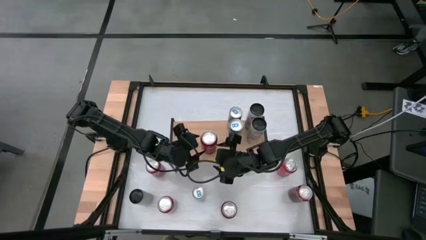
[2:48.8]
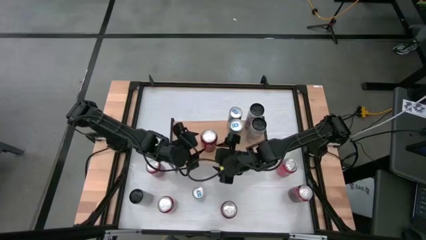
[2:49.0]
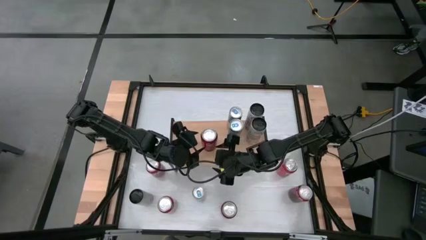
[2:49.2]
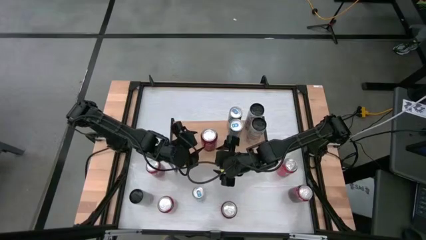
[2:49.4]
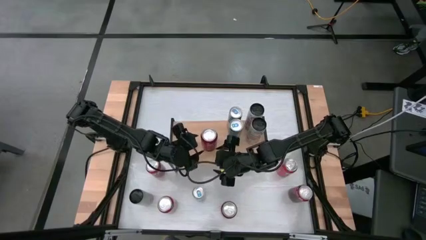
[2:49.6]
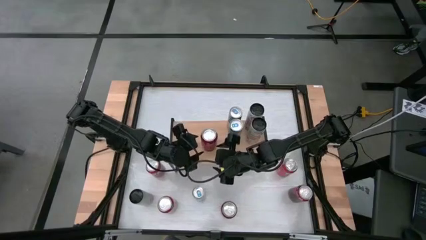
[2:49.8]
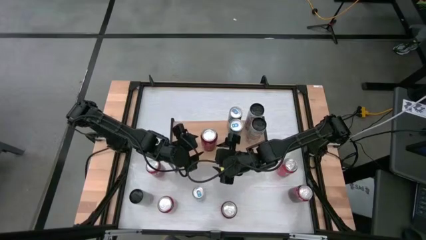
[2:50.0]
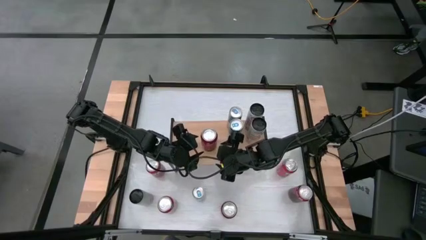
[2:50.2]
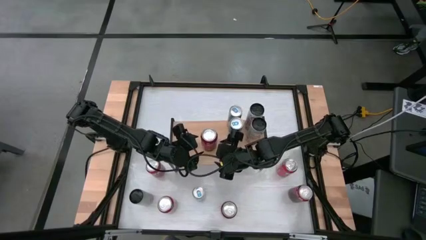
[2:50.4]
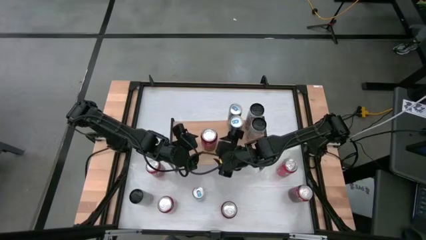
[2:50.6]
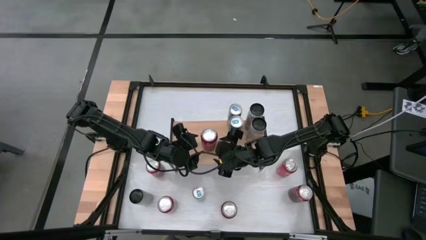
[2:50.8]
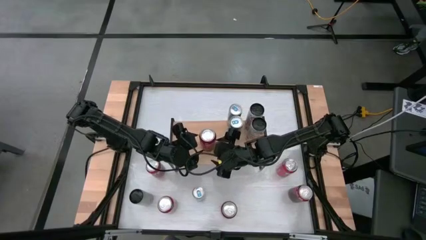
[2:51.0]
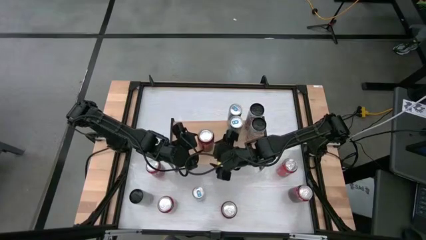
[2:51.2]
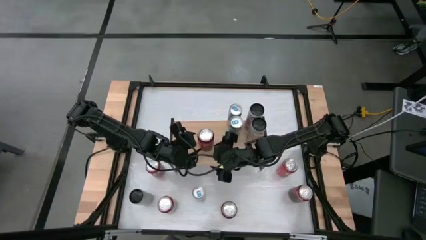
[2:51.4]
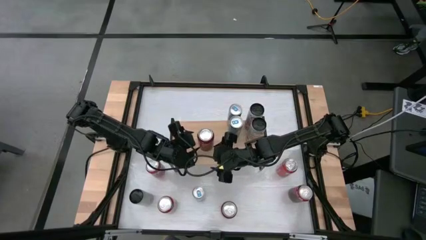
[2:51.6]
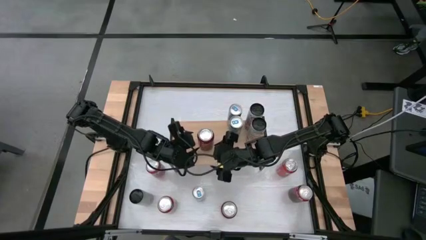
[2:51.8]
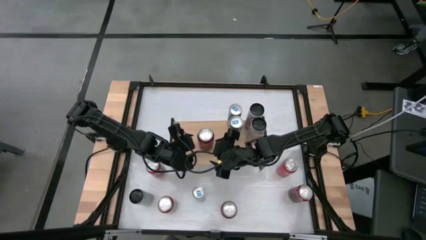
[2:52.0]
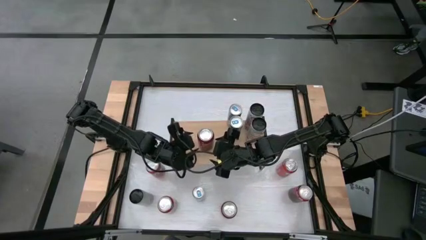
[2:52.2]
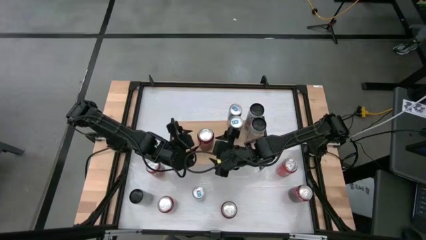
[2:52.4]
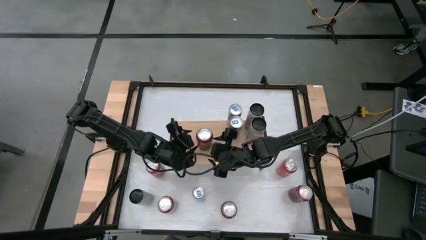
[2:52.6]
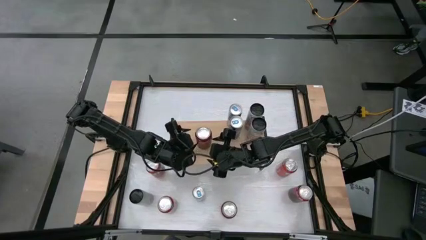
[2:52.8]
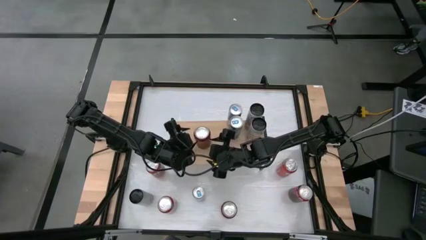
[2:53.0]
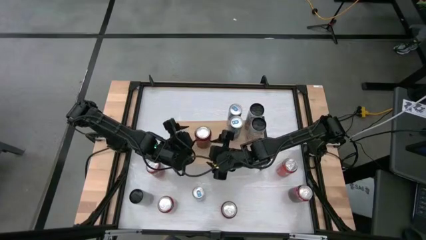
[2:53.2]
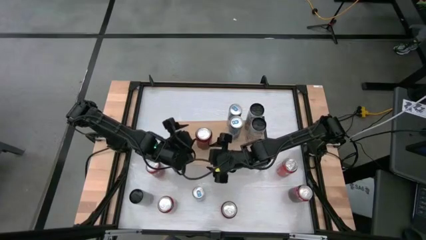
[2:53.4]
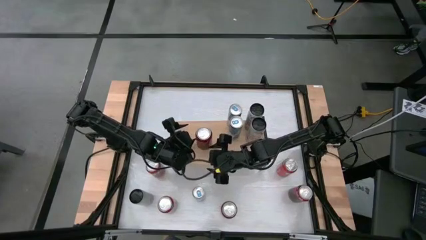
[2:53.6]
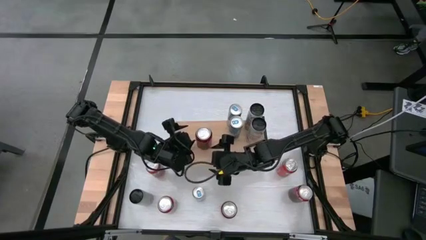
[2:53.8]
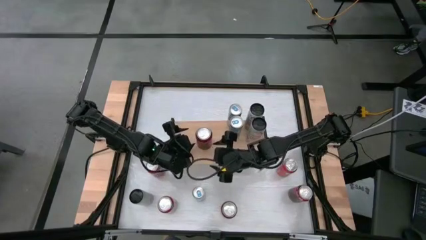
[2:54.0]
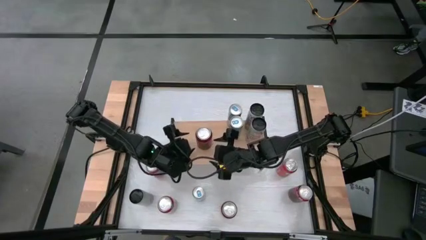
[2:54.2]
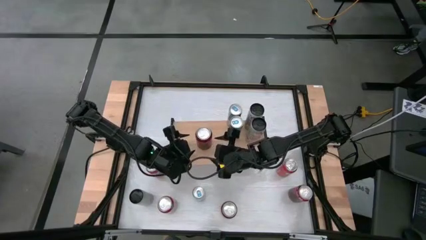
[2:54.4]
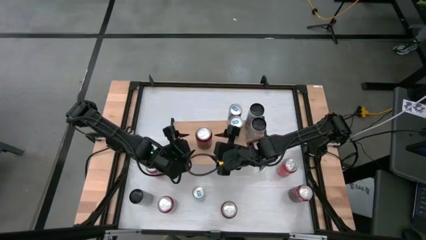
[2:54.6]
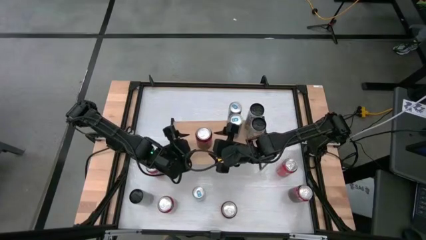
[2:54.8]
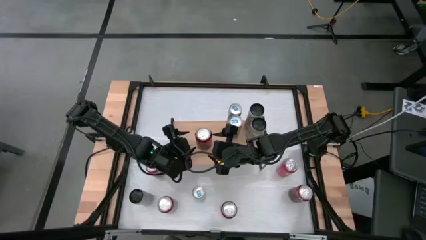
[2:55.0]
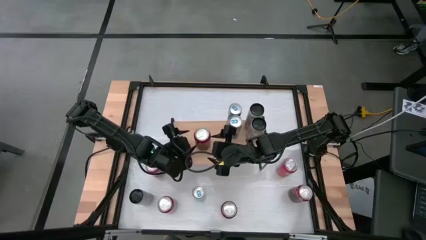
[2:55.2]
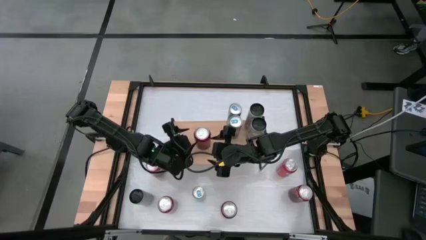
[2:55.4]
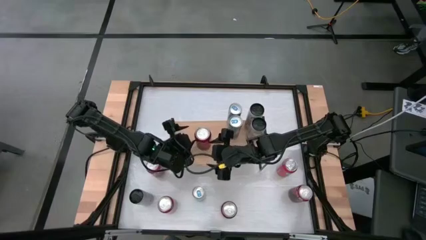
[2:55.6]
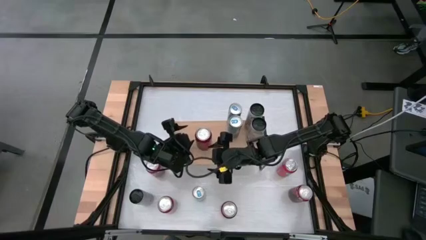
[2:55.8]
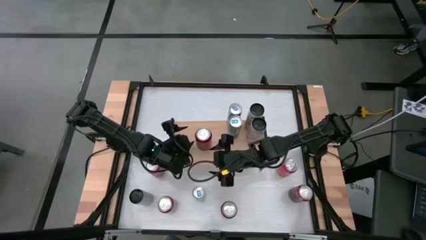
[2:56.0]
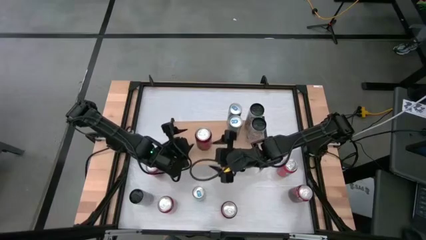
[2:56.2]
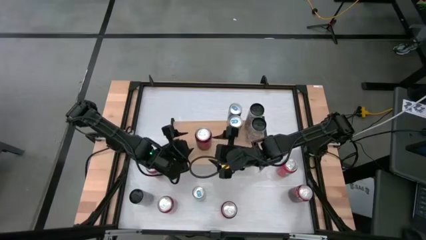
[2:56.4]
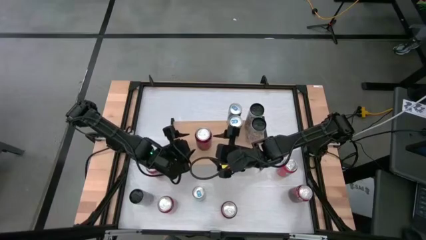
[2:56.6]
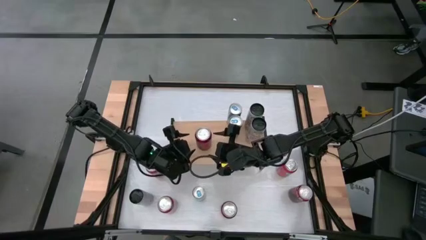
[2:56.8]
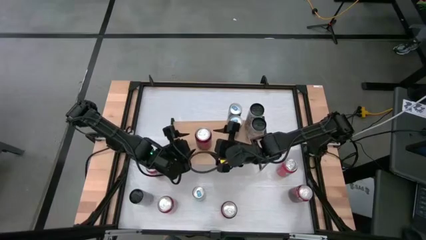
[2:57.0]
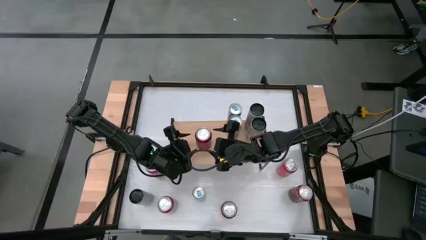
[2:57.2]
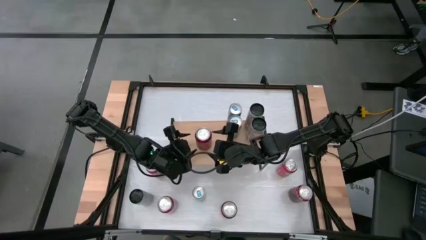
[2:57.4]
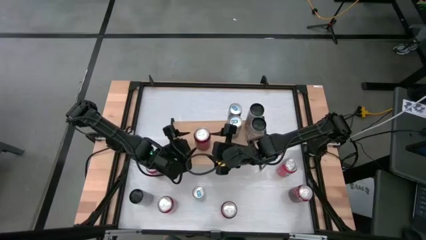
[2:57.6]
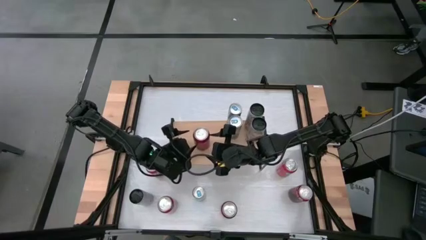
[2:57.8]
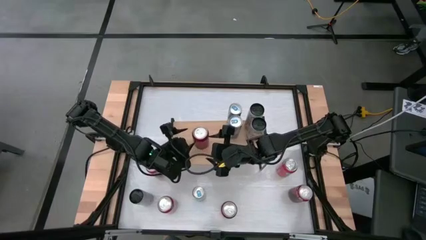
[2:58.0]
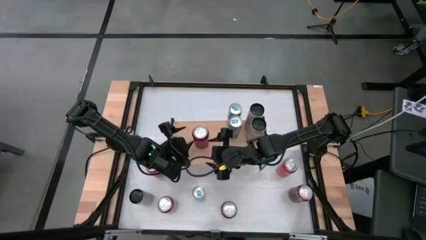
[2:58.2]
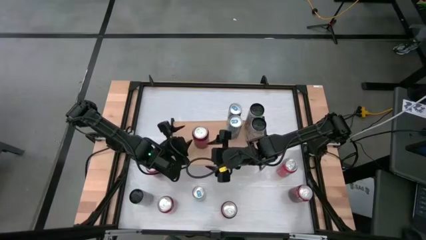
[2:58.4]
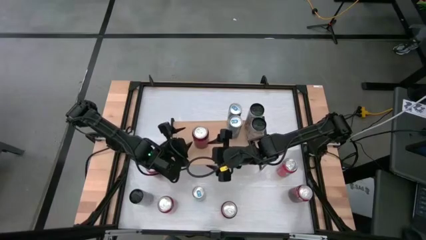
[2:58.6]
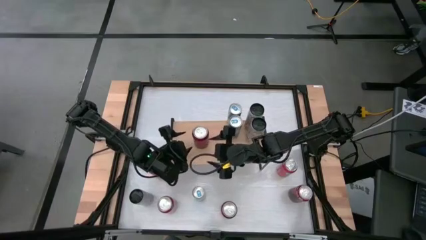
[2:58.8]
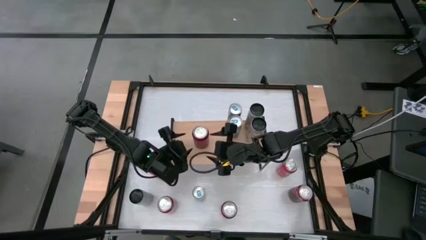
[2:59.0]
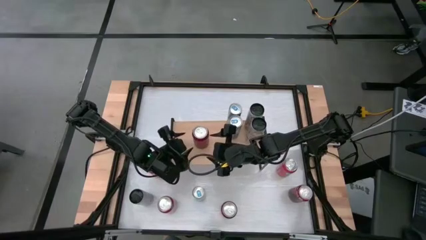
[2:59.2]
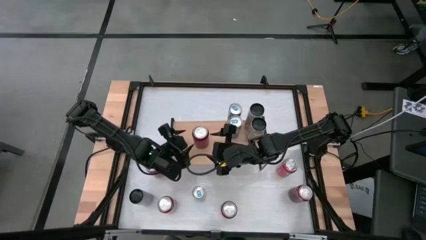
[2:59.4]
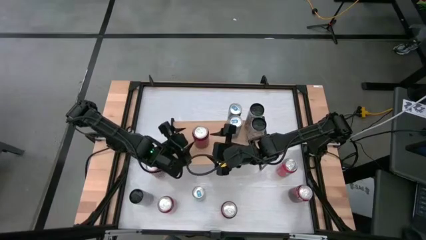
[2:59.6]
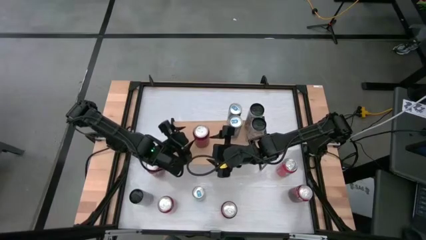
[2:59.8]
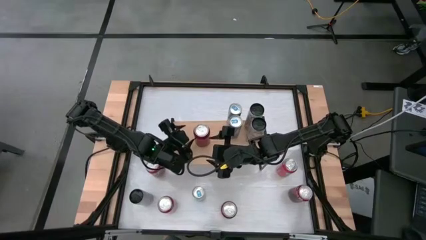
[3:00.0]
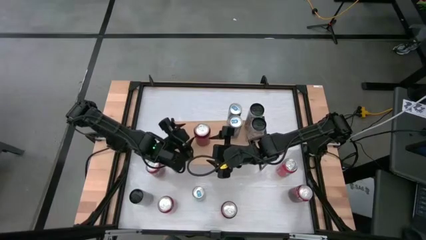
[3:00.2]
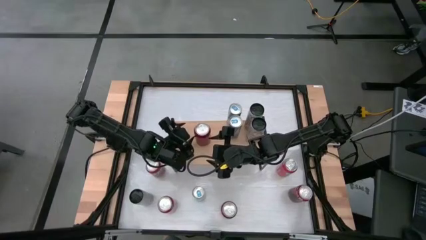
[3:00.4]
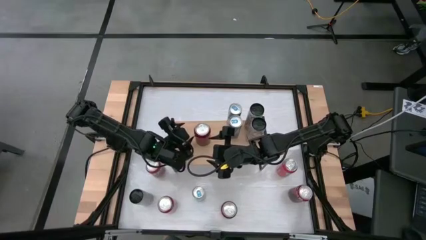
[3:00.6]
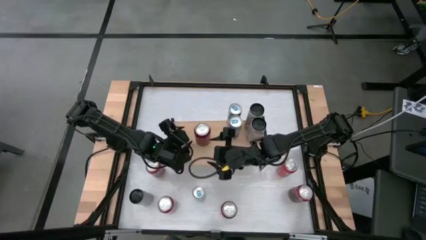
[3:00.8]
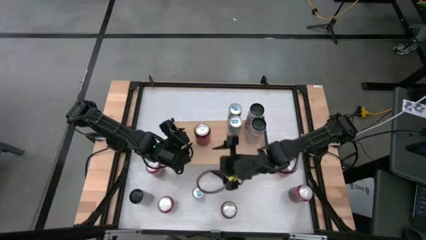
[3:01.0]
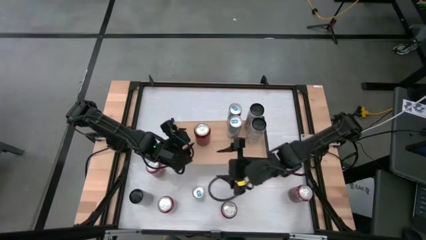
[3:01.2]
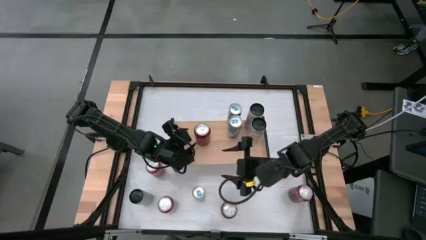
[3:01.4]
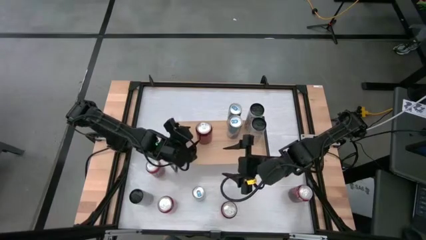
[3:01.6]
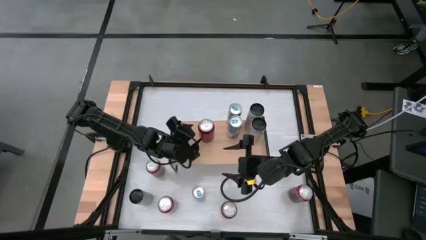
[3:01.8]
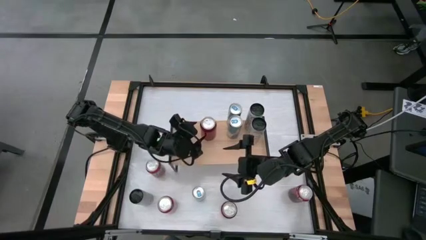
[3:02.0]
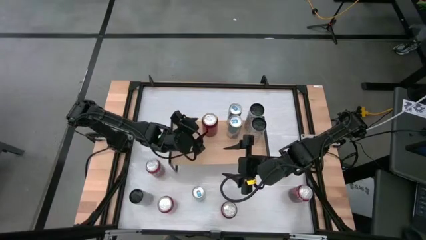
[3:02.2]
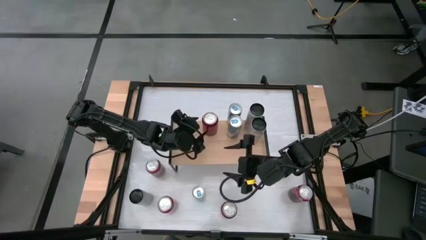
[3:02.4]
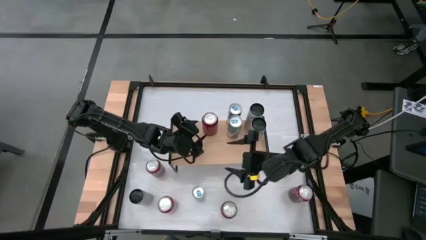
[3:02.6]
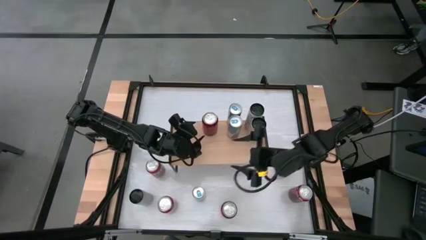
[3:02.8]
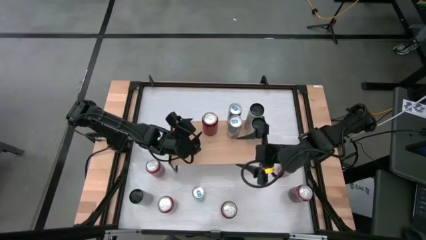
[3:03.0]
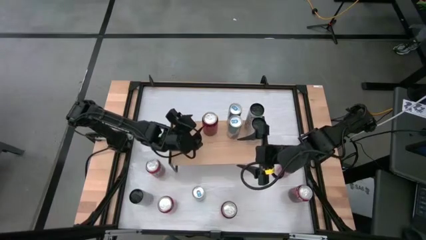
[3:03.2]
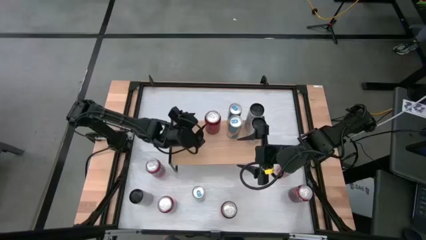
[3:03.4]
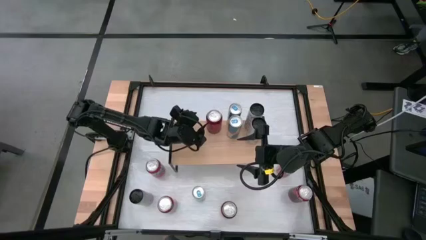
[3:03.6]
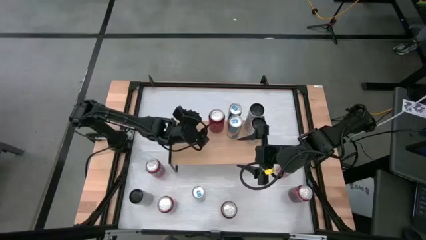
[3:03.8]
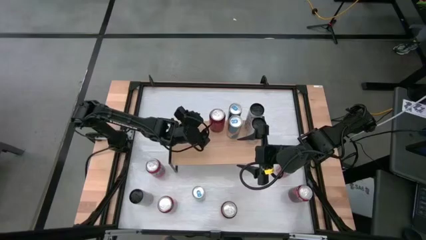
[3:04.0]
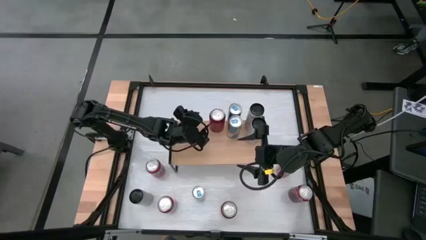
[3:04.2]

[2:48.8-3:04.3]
Task: Place canned beverage on shelf
Put the top red-black soda can on the shelf
